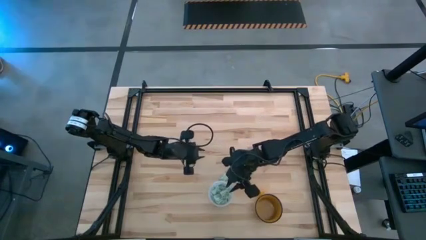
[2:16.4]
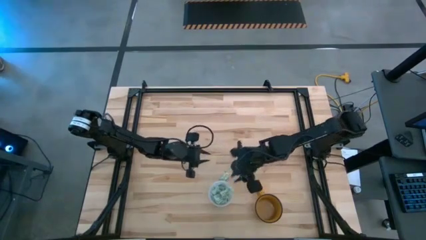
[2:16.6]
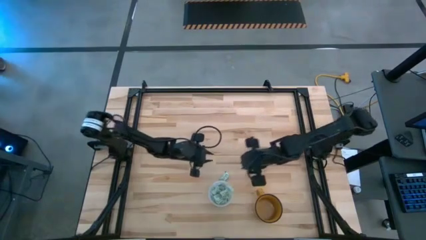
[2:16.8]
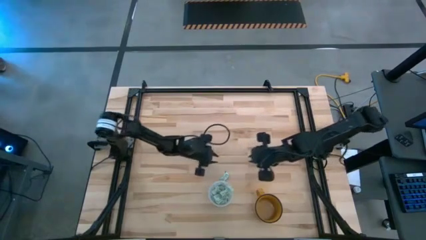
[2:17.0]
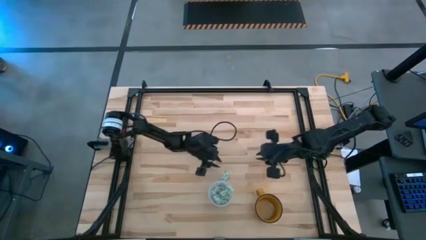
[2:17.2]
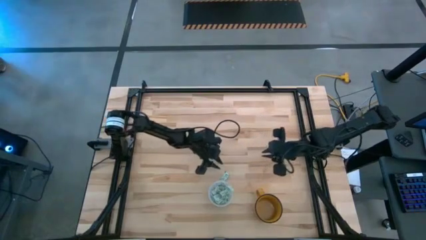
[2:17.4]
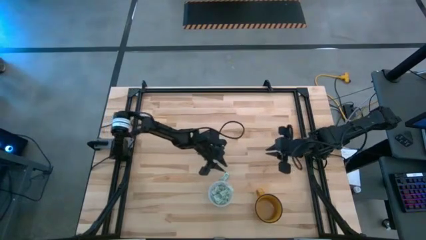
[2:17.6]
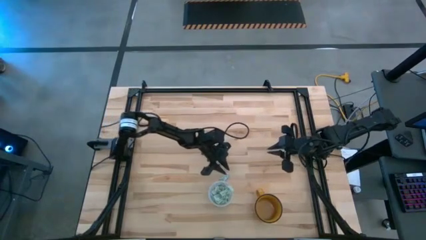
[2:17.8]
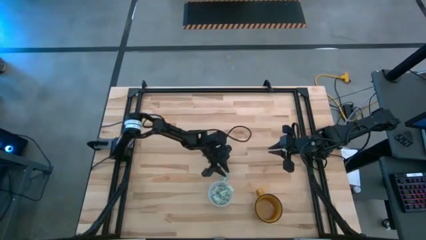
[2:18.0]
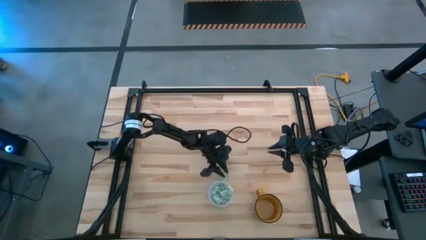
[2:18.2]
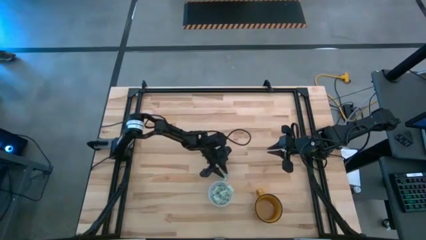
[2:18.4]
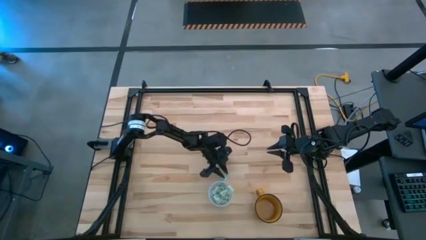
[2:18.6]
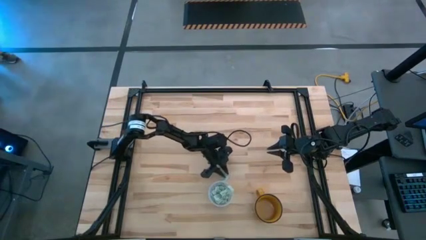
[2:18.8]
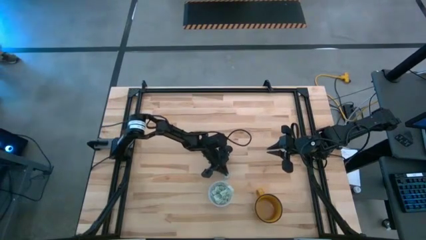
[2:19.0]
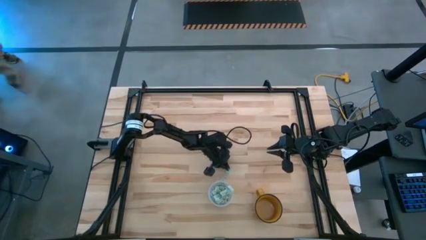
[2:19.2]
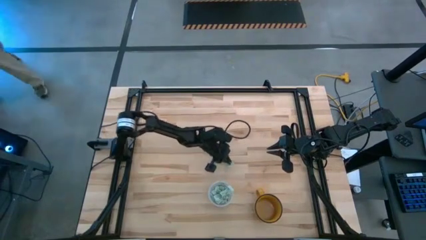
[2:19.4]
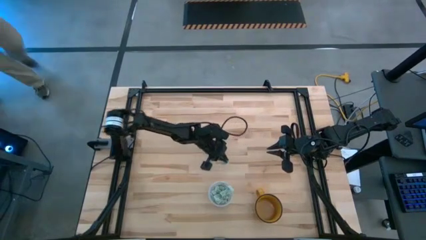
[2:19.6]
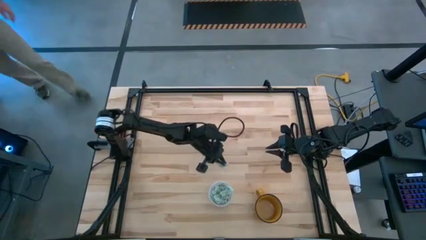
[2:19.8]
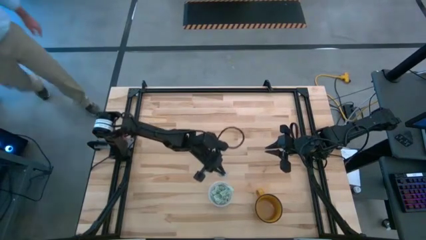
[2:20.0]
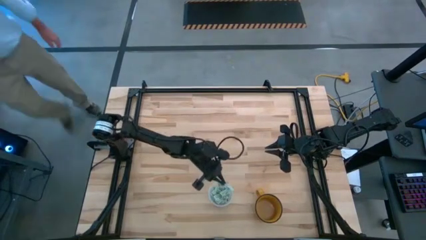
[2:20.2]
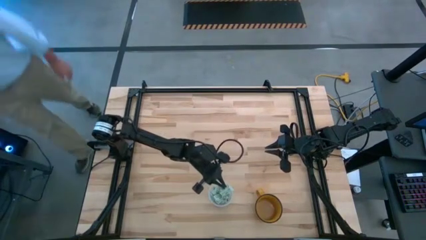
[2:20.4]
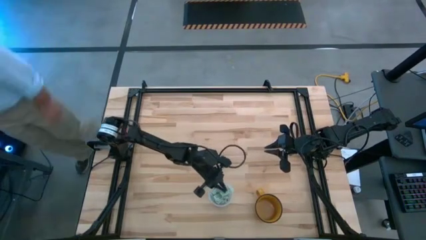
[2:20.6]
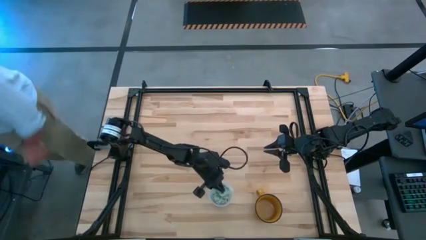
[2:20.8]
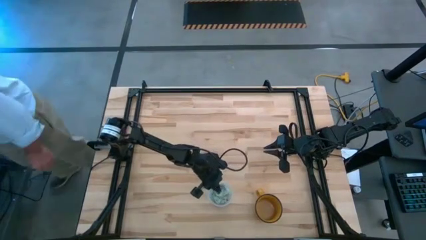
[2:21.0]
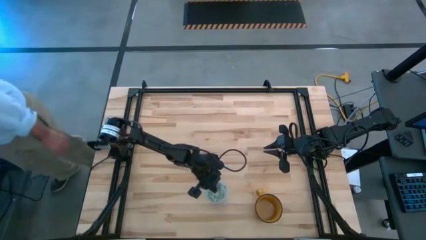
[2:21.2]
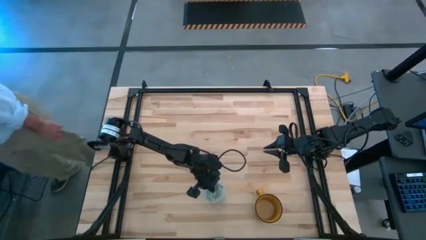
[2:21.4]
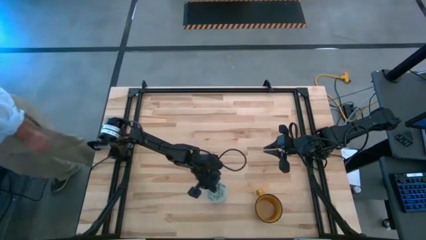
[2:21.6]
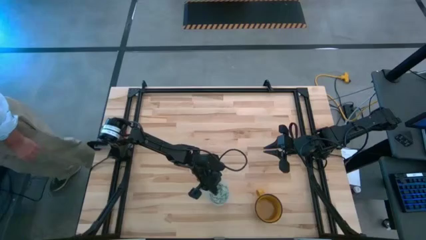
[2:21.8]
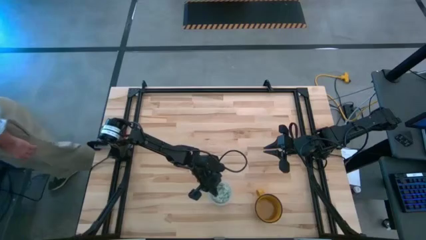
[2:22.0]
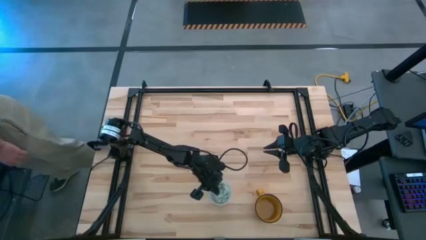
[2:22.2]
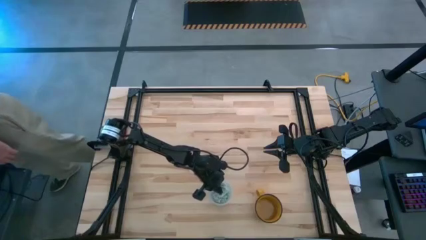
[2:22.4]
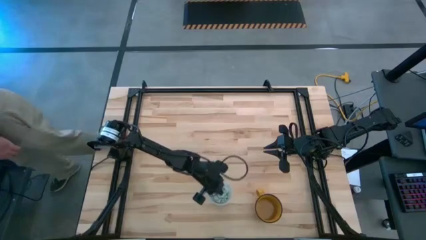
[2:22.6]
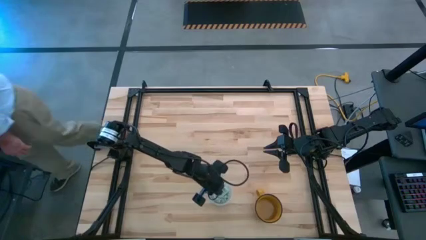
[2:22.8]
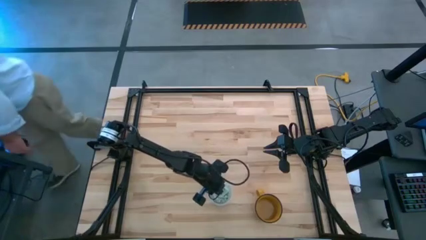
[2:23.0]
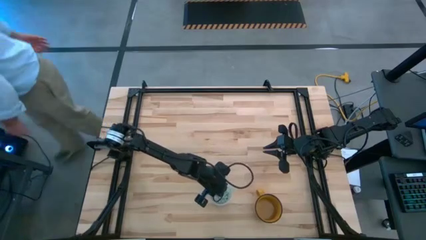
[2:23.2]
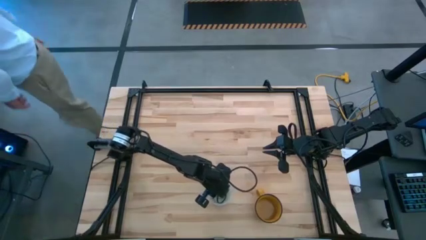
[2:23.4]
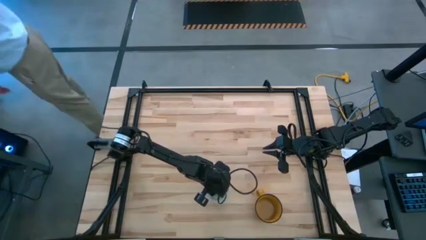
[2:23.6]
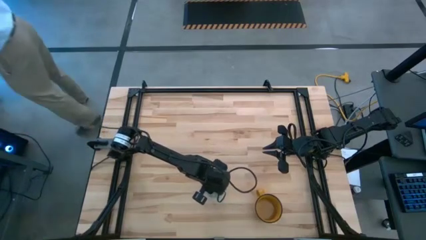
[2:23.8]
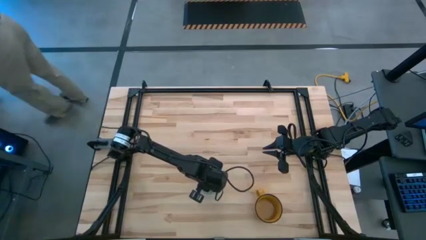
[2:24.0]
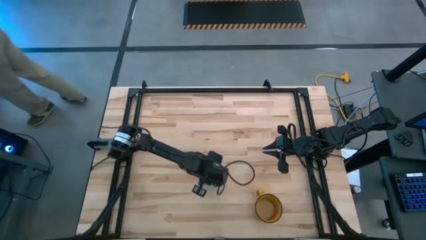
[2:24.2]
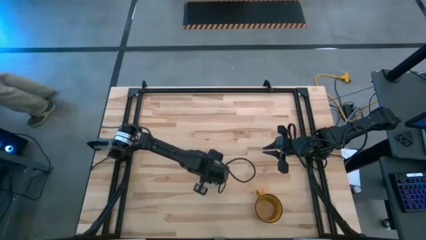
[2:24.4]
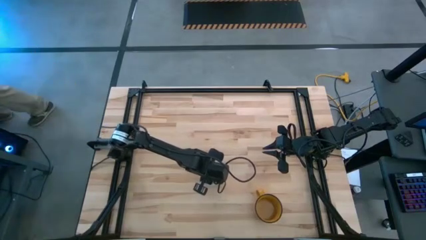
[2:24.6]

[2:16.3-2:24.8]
Task: Pick and place Stevia / Truvia into bins
Put the stevia packet into the transparent bin

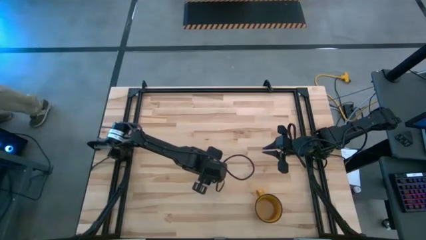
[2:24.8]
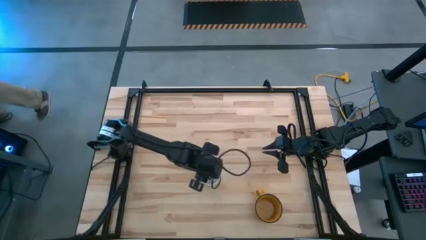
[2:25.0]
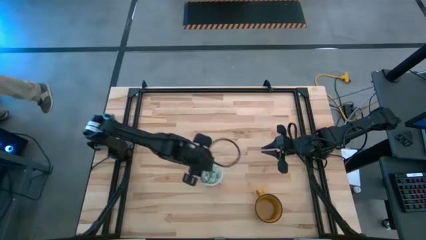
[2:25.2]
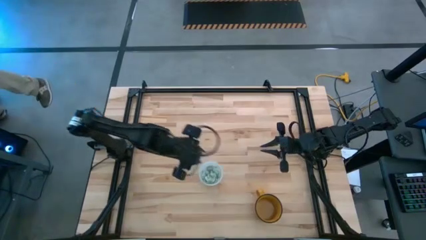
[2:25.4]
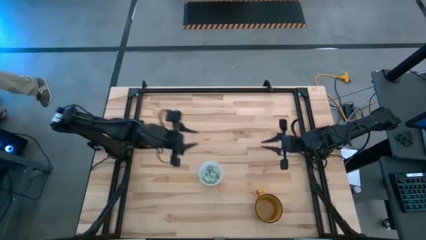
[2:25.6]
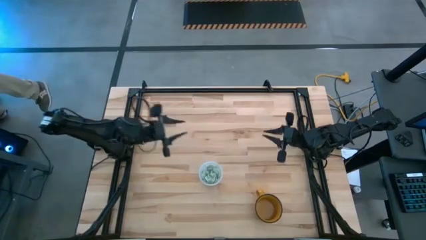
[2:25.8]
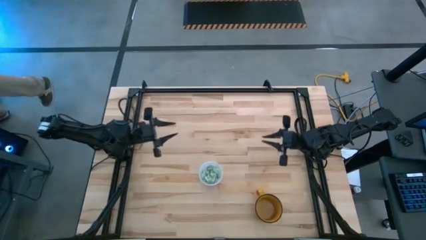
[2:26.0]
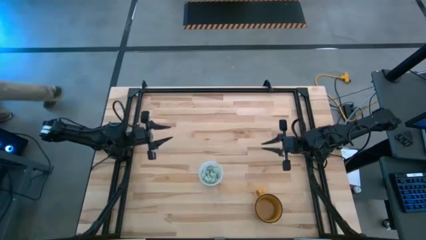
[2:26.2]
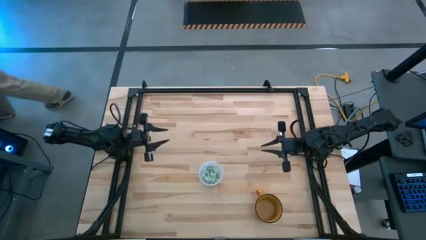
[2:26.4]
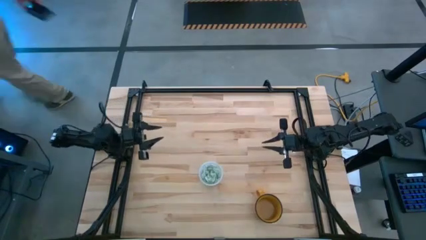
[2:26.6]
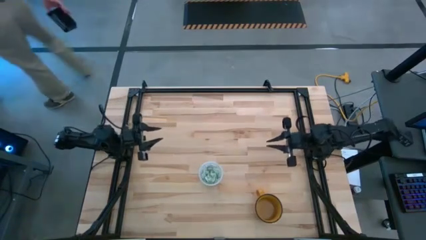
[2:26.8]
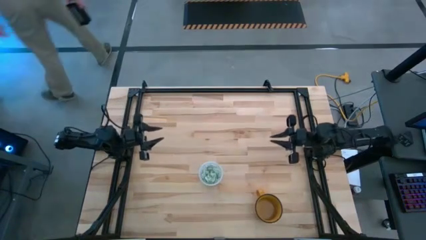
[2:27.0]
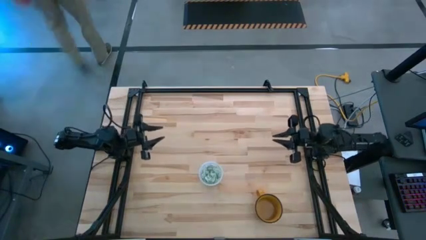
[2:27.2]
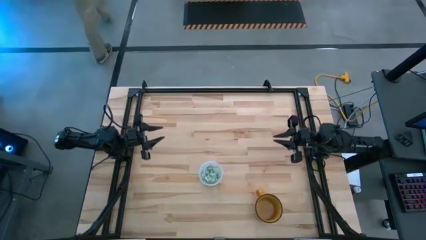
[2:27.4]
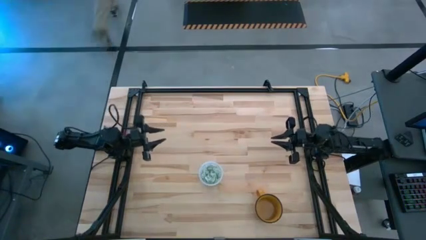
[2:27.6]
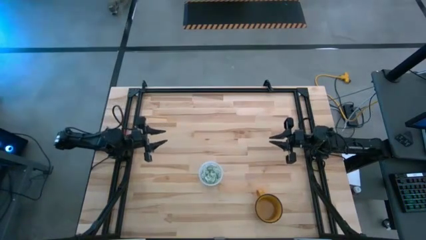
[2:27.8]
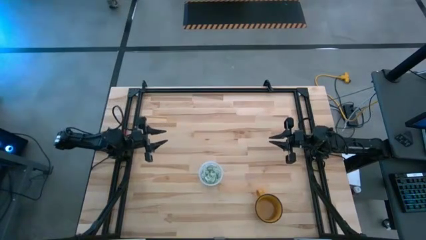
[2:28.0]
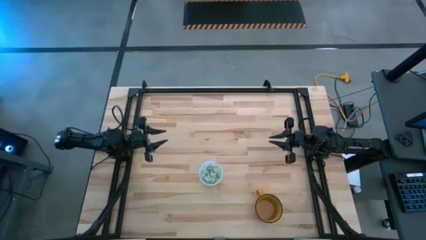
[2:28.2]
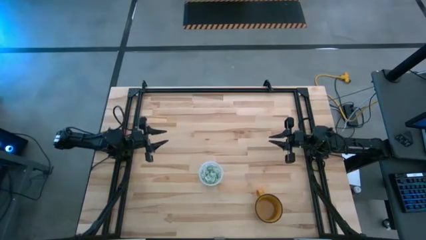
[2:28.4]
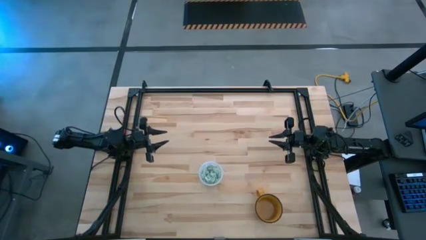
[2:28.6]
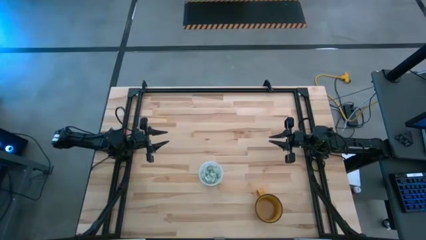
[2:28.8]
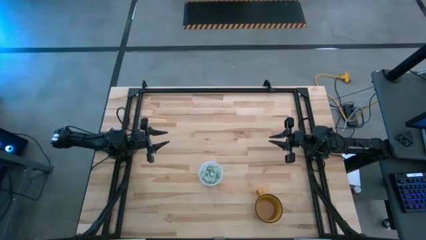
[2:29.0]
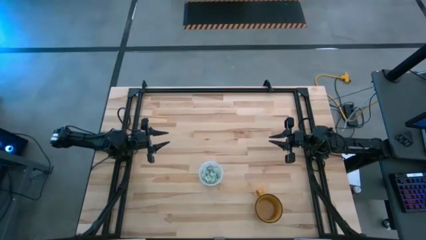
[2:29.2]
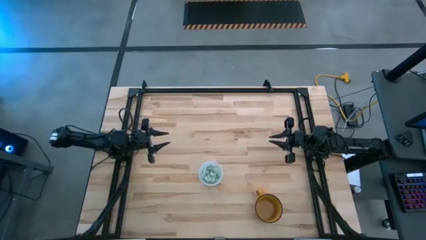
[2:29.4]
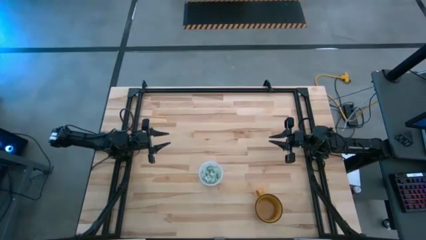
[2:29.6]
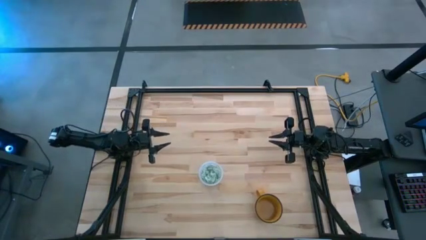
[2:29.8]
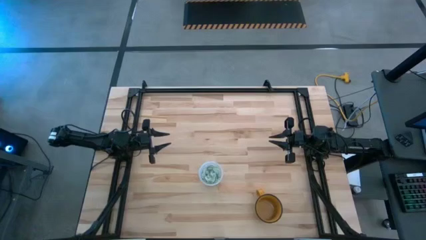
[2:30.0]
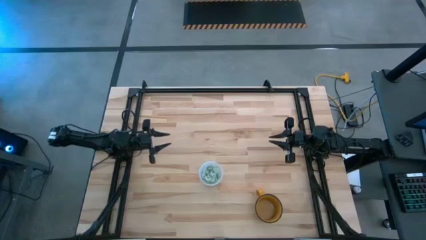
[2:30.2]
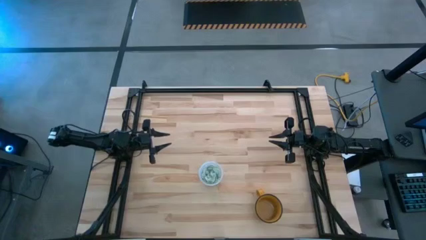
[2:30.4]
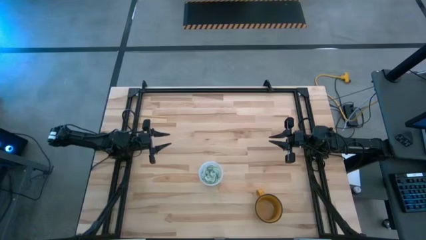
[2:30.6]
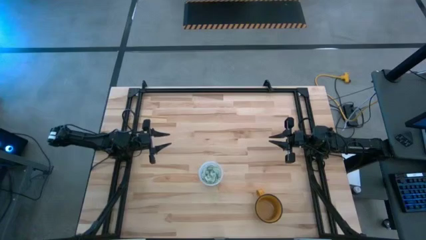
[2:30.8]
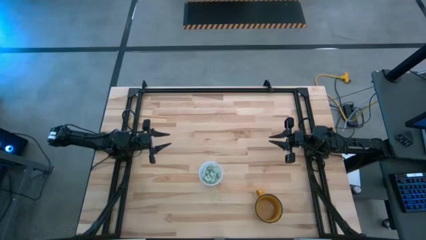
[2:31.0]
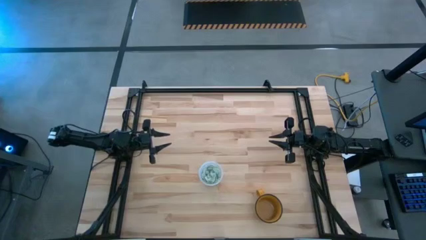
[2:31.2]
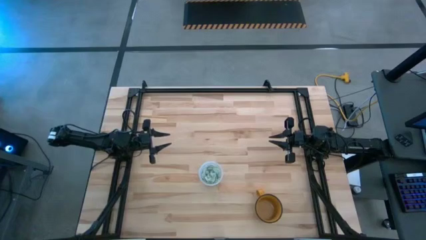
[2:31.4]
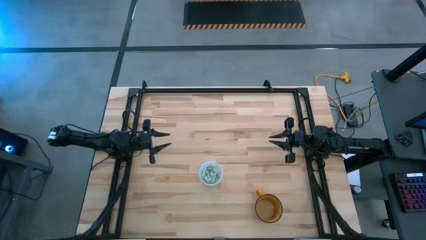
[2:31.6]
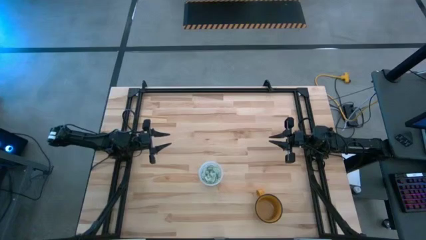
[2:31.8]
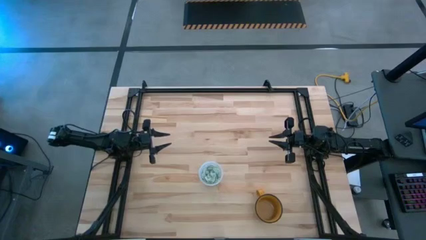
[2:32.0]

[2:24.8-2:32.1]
Return to Home Position

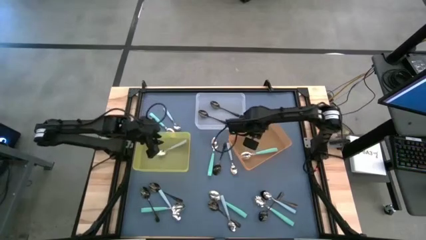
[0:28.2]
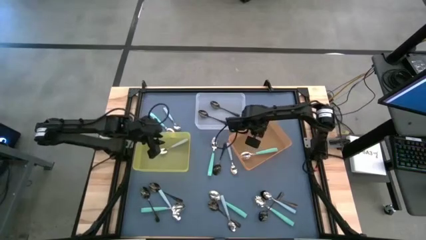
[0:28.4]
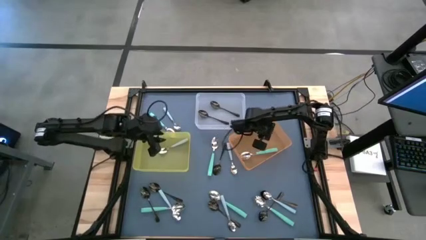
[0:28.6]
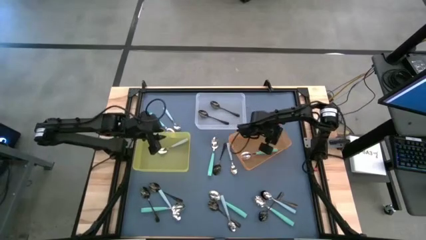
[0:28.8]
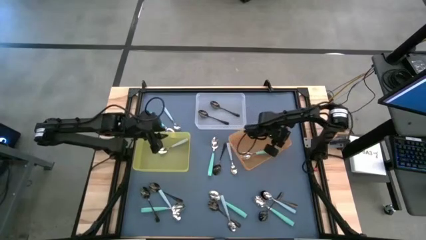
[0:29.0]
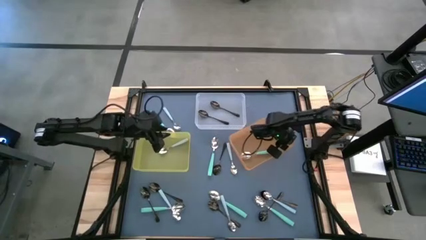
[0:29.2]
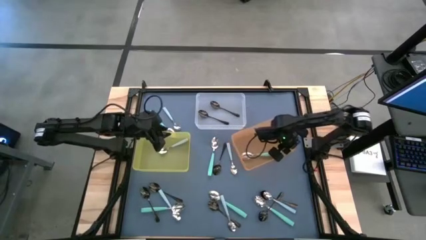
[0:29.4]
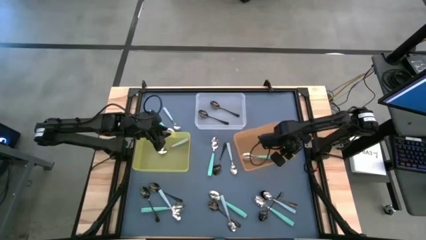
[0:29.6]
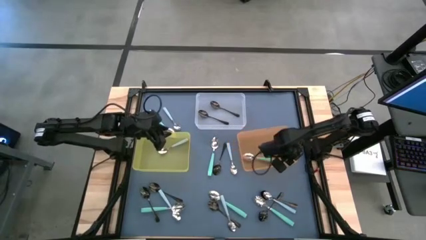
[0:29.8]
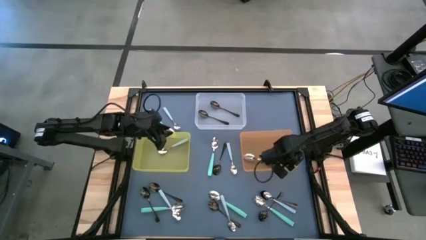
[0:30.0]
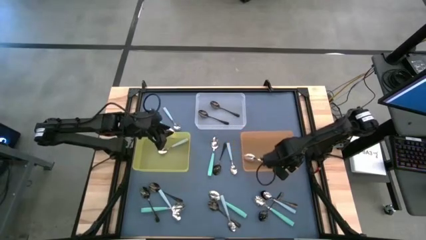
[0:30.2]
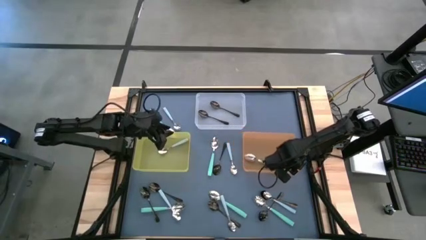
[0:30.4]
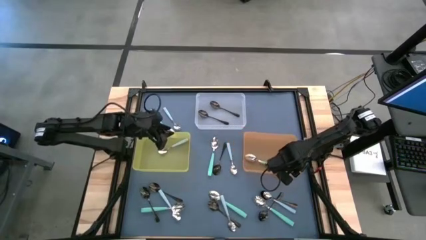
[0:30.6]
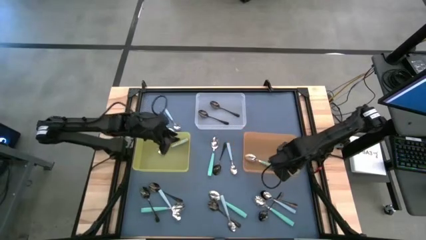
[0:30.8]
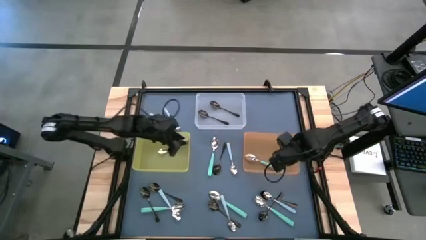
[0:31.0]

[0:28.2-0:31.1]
Task: Sort silverware by color (type)
Adjust the orange bin on the table
